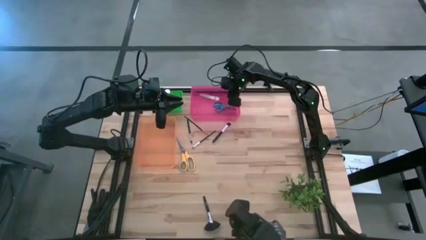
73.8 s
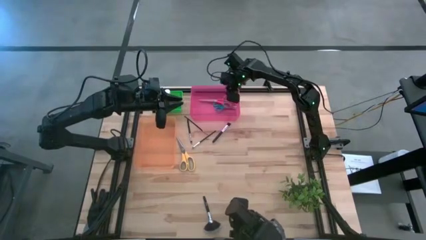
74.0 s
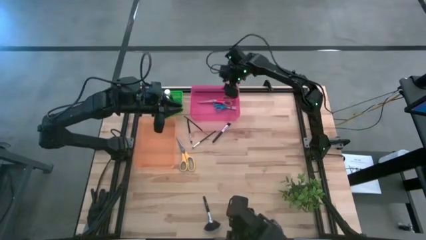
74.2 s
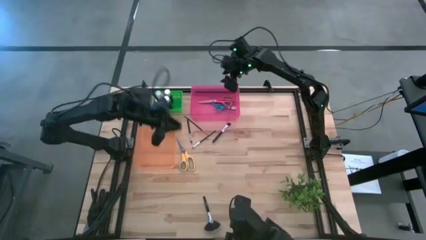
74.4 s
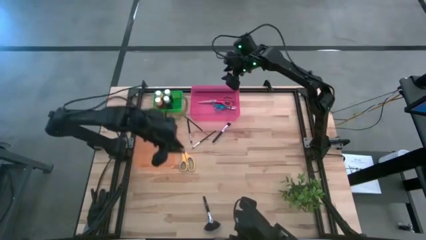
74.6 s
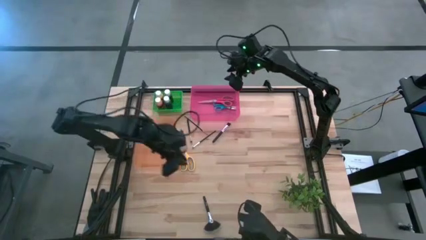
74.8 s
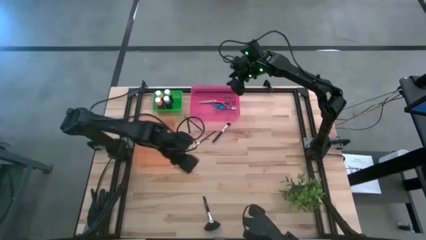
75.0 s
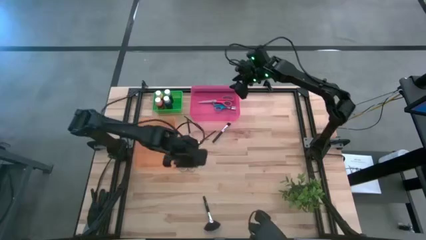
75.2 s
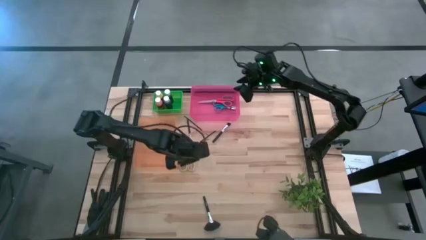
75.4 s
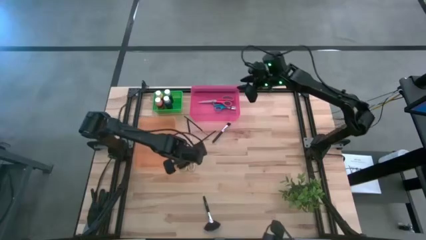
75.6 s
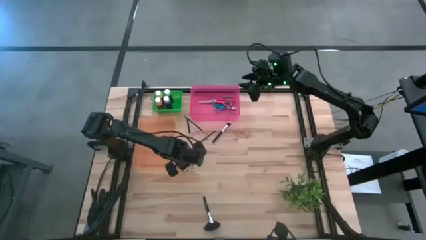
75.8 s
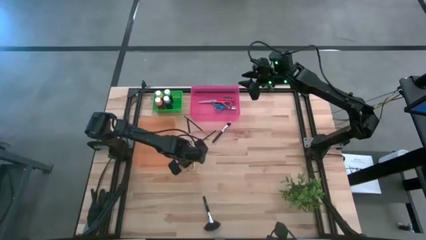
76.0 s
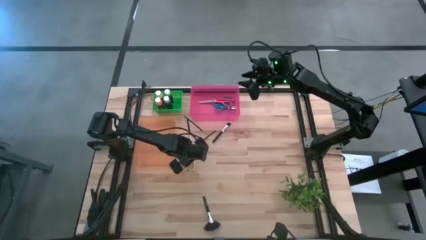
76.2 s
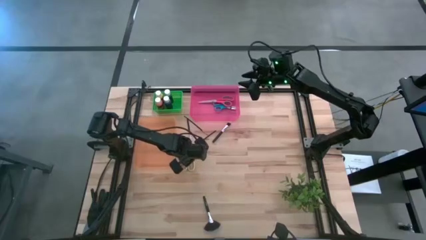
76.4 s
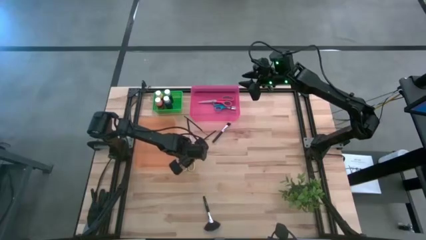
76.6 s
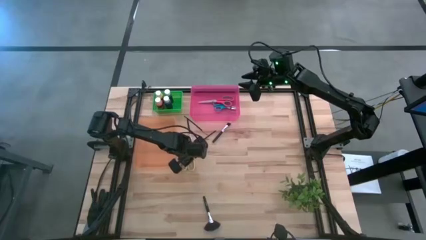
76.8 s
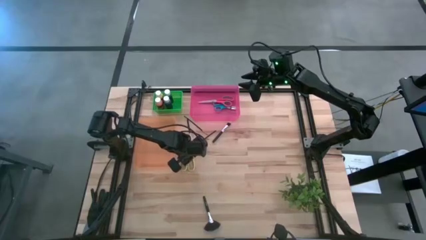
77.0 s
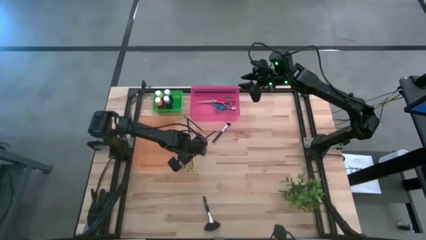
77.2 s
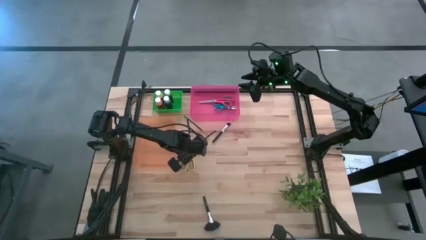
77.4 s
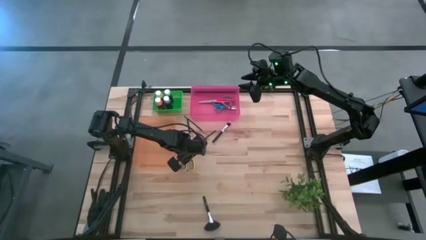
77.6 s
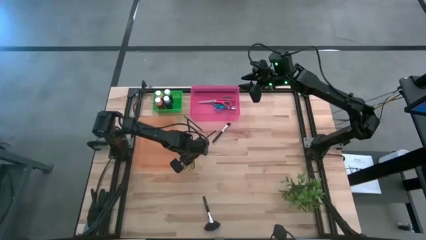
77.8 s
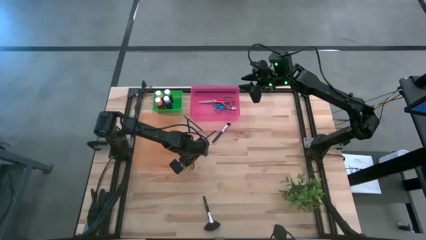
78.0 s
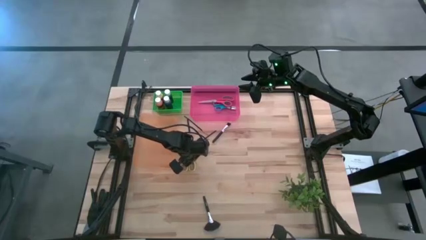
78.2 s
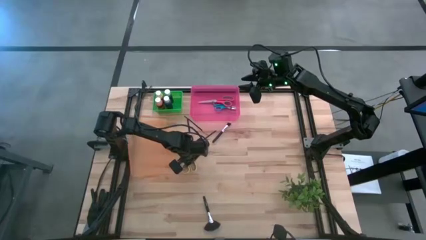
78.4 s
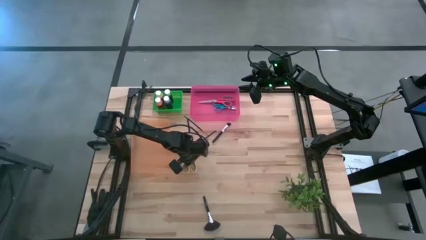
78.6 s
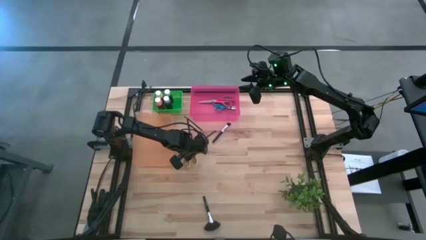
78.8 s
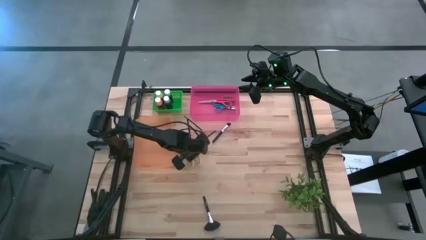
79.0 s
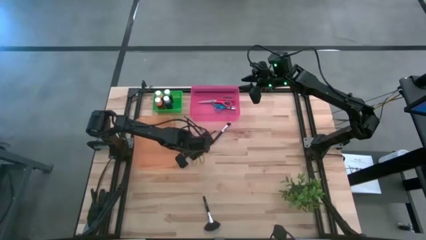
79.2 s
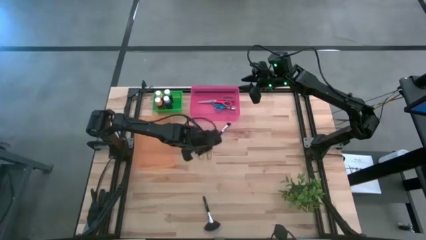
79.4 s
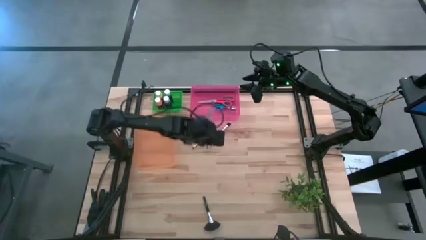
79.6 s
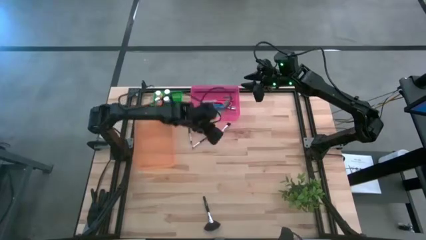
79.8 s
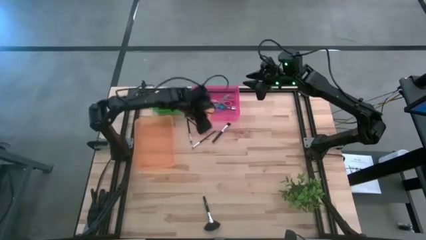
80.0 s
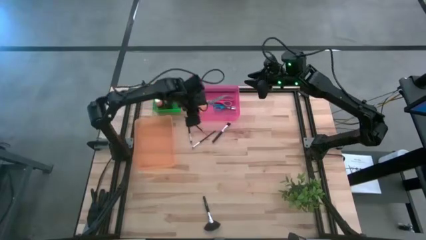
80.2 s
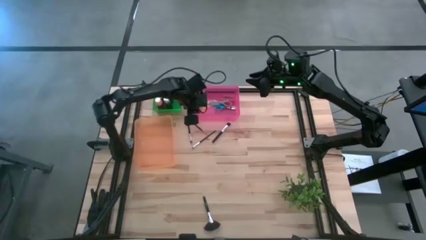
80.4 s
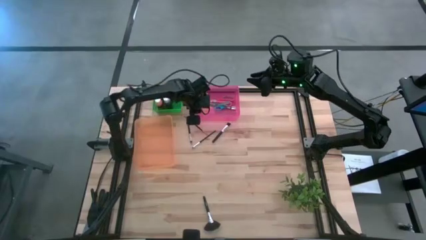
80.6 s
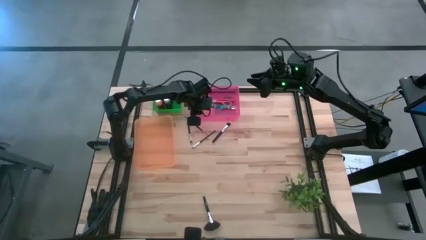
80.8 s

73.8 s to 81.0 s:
Task: Pick & Place Paint Supplies
Put the yellow scissors into the red bin

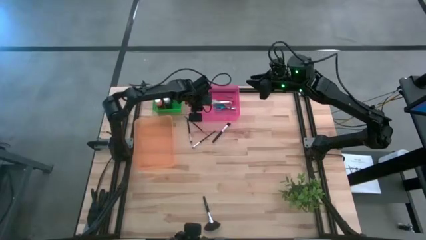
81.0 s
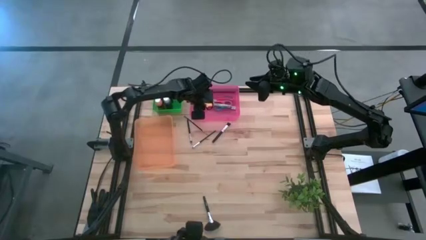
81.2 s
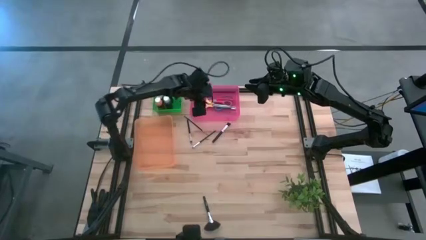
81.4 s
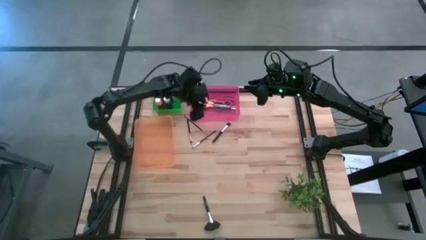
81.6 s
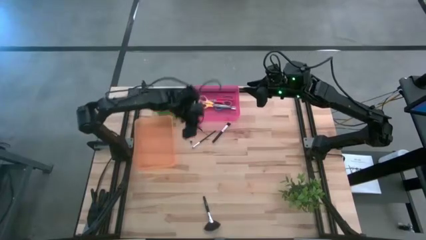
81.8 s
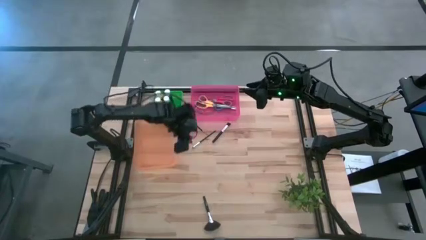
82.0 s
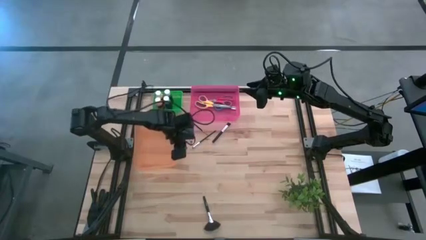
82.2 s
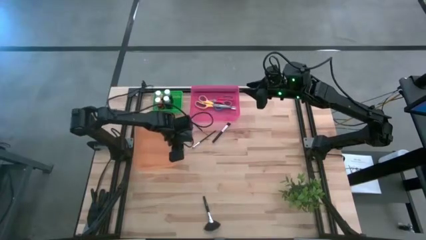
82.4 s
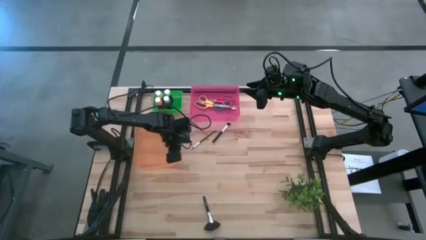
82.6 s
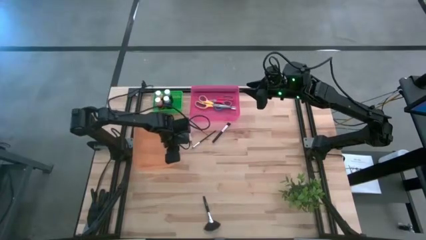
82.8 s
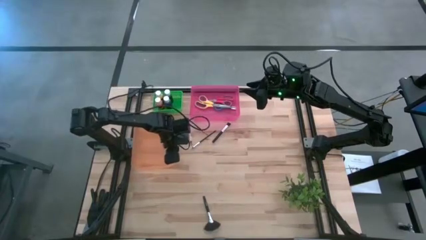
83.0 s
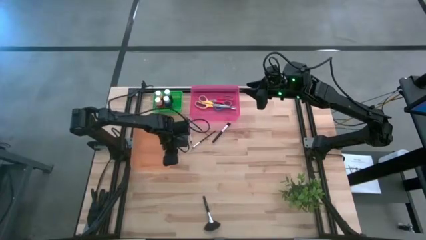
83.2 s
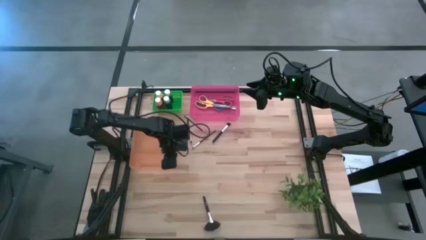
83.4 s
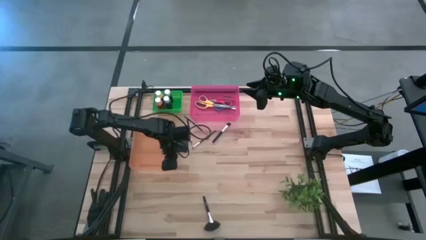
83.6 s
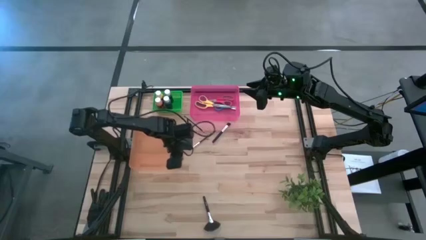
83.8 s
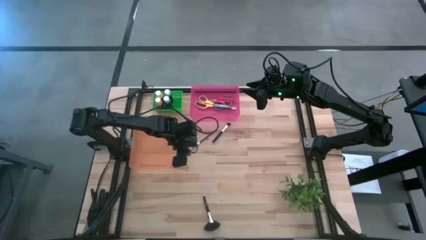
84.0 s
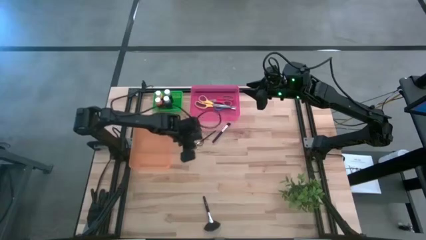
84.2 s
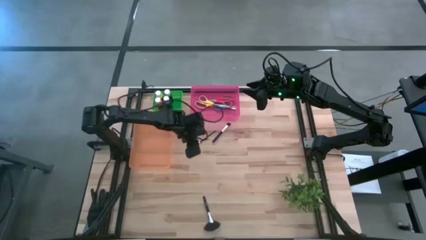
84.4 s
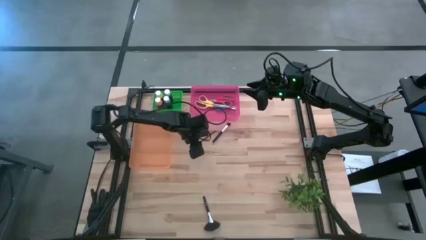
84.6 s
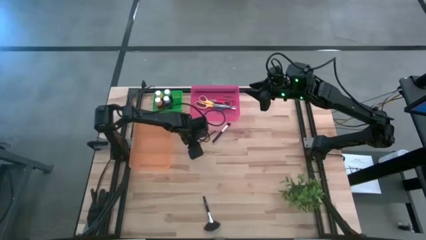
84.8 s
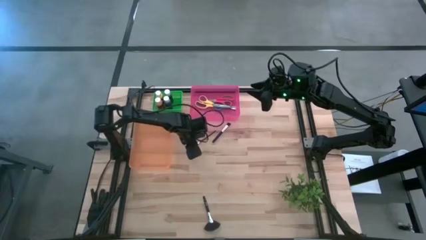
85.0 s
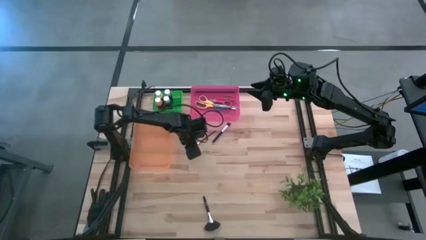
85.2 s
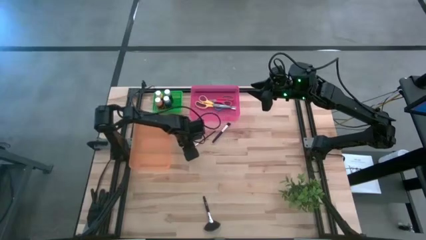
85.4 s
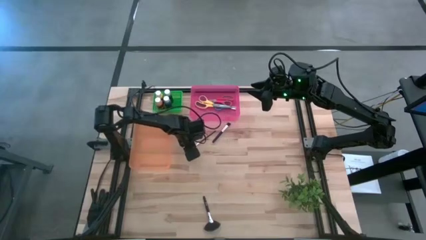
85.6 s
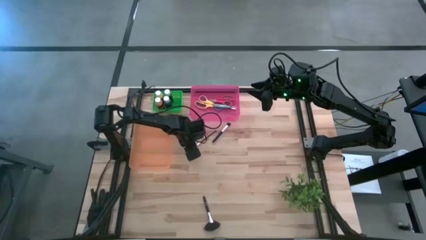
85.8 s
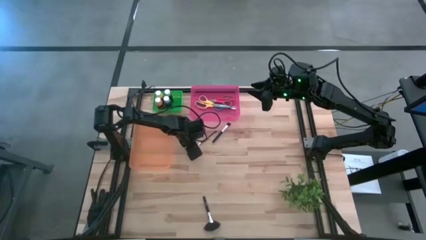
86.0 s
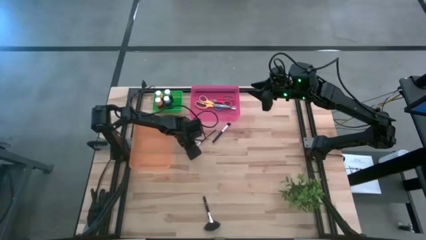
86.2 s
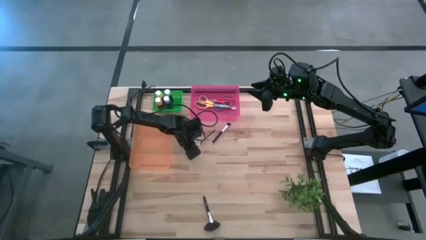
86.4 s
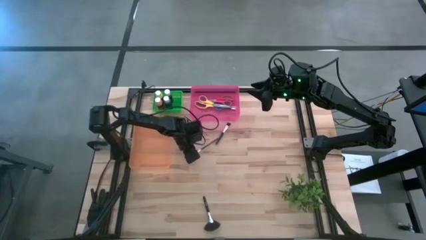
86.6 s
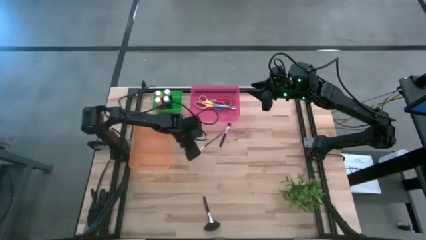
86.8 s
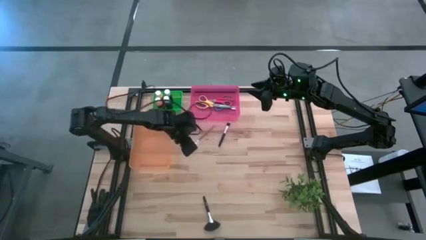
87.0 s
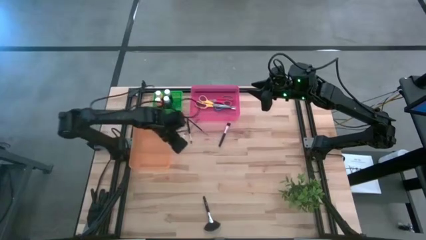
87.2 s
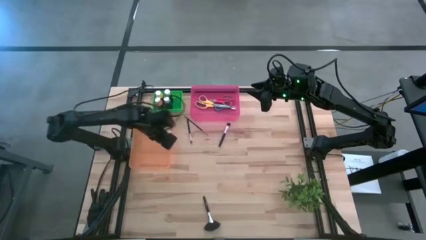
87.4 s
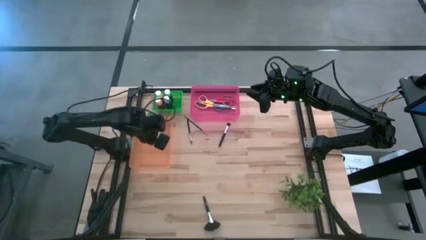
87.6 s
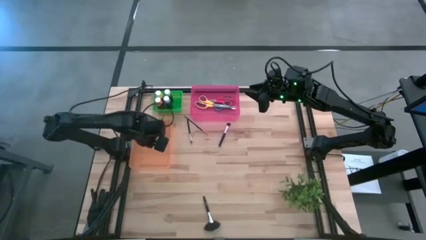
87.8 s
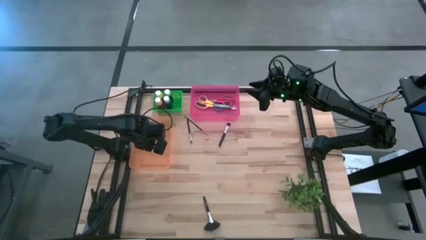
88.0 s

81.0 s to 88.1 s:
Put the black paintbrush into the orange bin

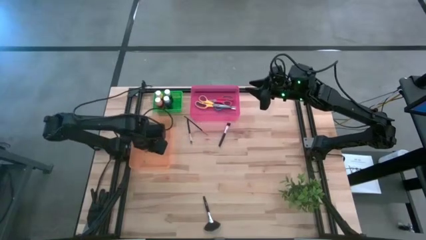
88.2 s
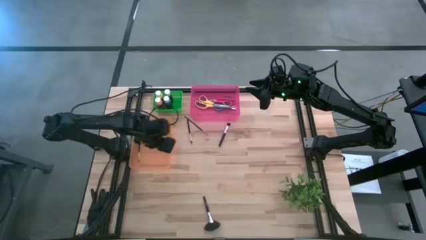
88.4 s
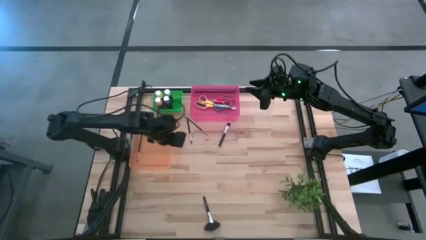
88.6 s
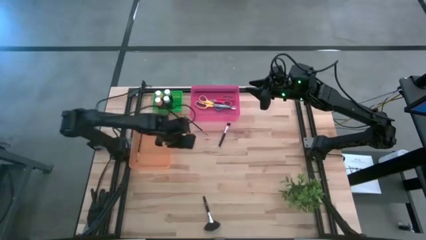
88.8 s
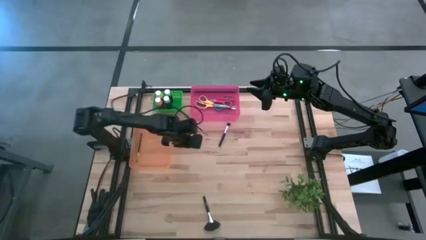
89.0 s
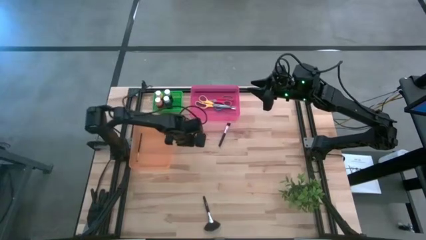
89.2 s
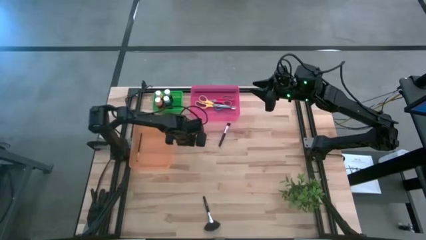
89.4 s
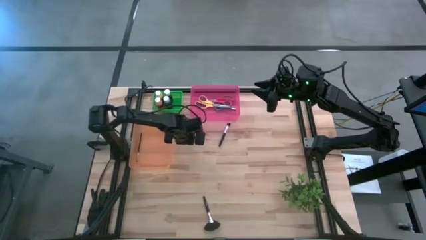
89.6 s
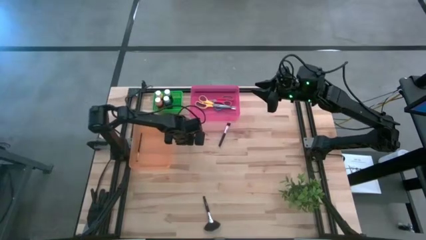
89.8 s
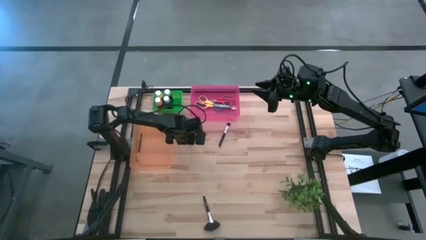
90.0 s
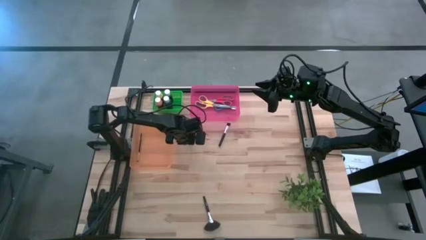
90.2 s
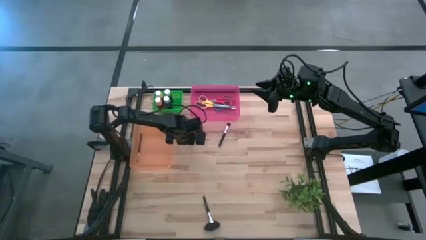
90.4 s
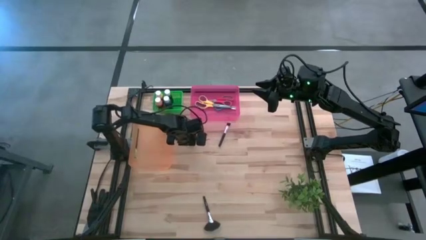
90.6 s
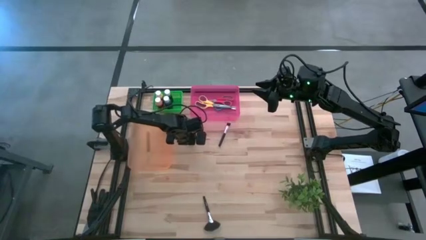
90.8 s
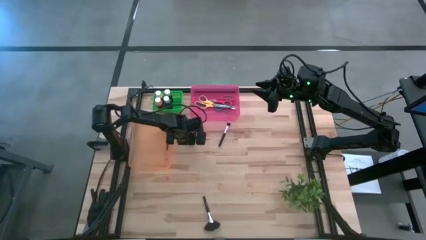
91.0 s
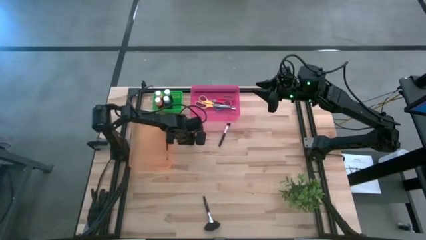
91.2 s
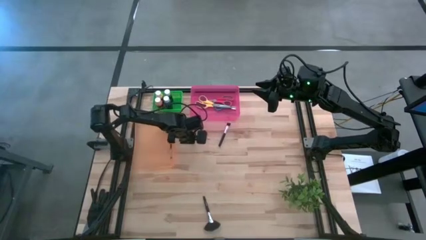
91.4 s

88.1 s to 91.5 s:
Put the black paintbrush into the orange bin
